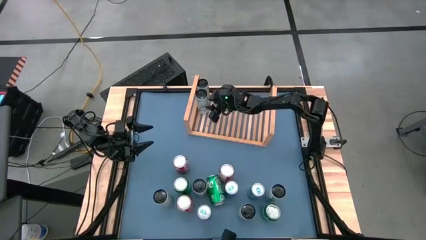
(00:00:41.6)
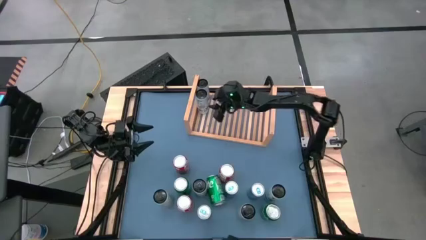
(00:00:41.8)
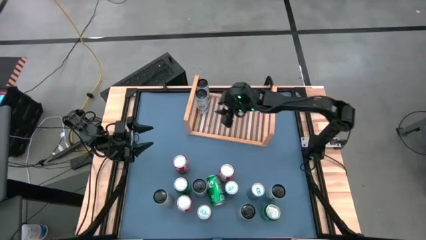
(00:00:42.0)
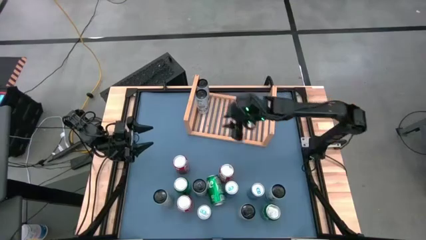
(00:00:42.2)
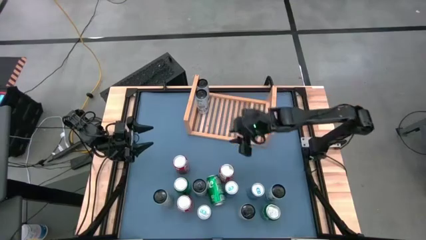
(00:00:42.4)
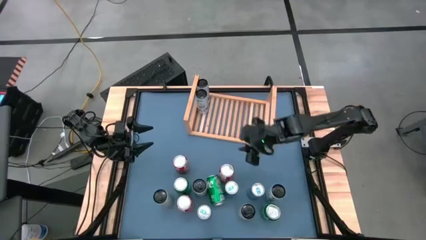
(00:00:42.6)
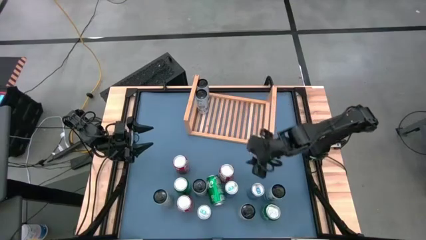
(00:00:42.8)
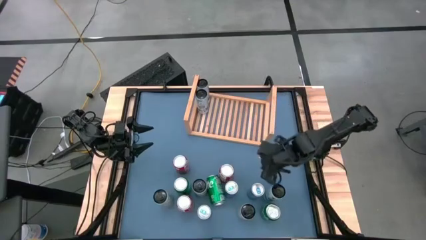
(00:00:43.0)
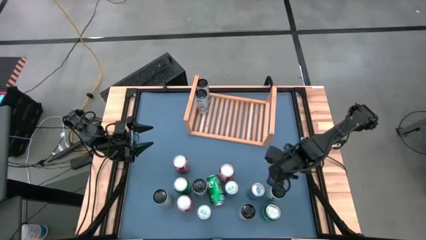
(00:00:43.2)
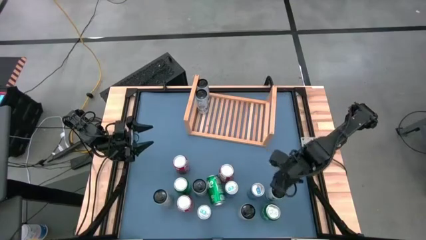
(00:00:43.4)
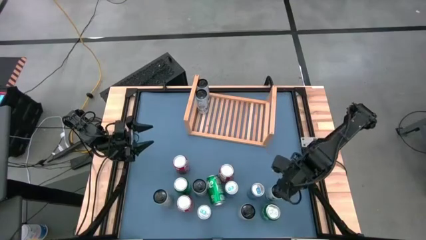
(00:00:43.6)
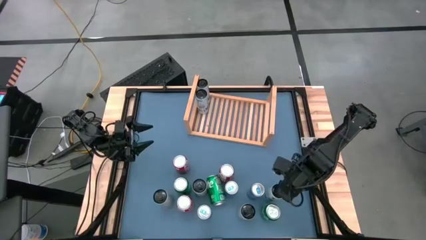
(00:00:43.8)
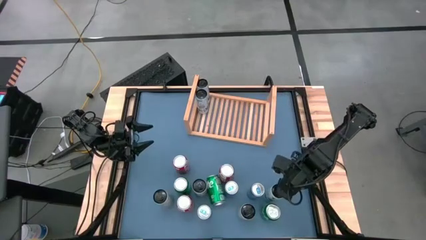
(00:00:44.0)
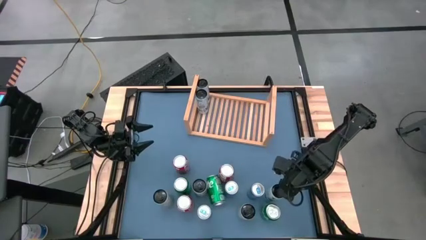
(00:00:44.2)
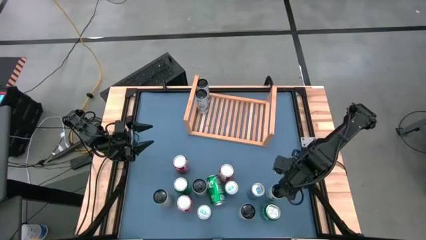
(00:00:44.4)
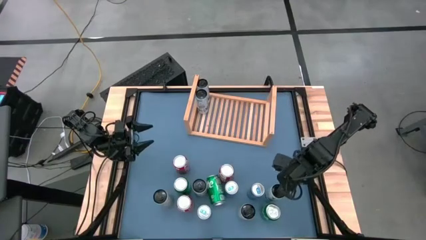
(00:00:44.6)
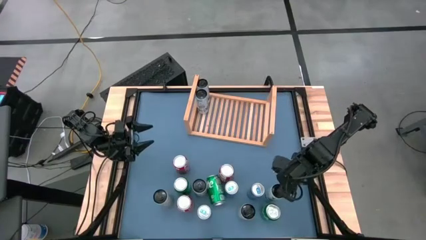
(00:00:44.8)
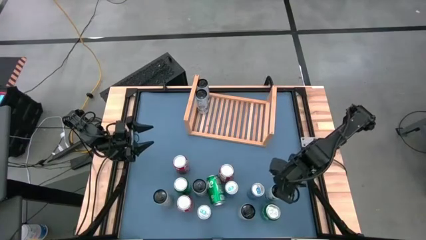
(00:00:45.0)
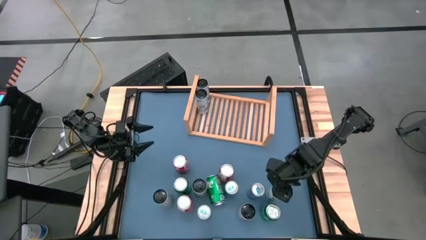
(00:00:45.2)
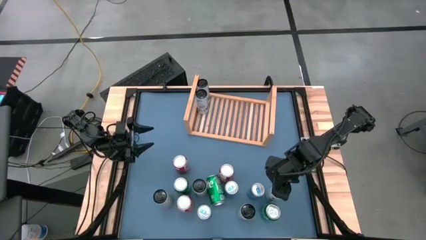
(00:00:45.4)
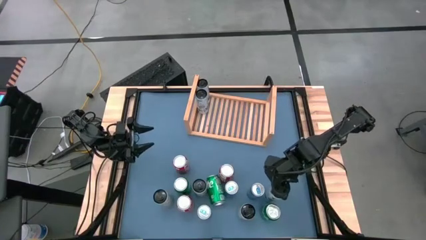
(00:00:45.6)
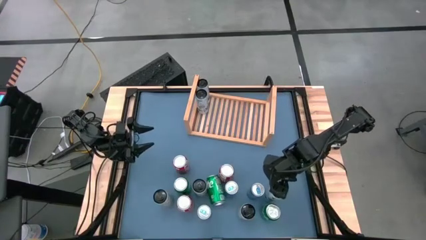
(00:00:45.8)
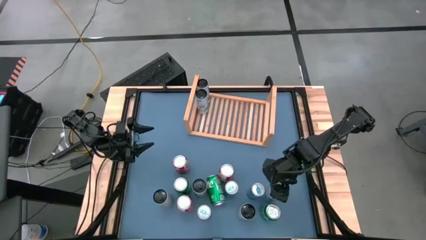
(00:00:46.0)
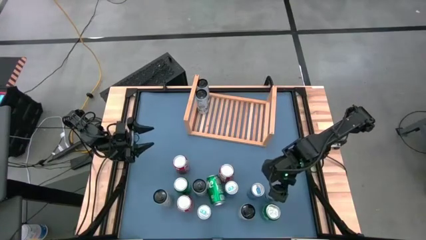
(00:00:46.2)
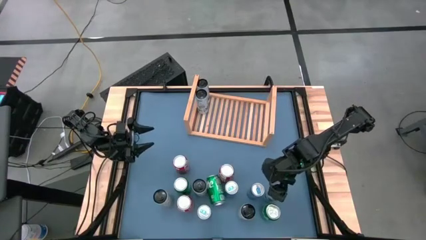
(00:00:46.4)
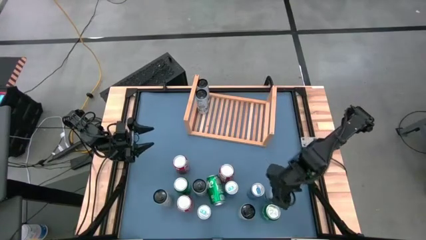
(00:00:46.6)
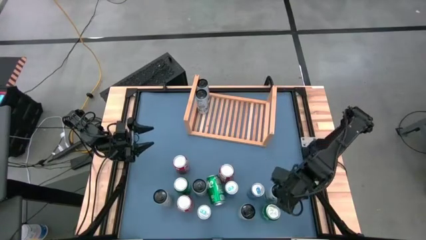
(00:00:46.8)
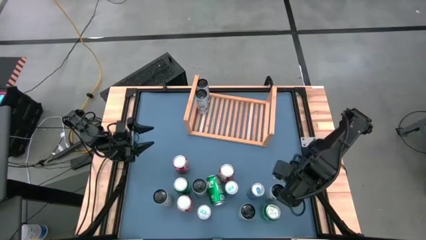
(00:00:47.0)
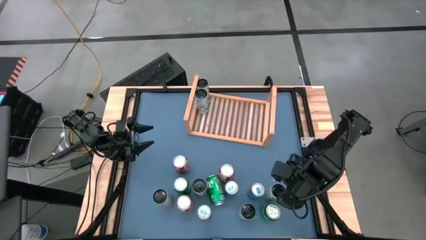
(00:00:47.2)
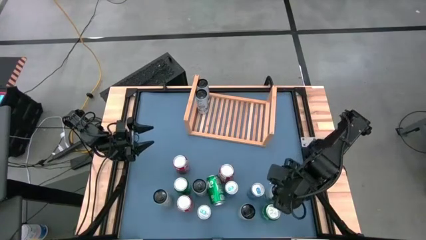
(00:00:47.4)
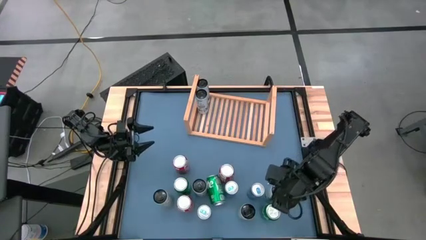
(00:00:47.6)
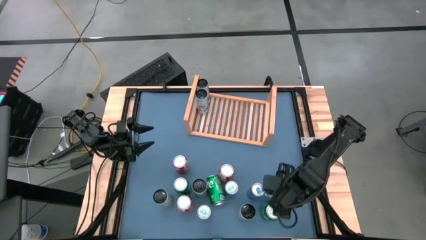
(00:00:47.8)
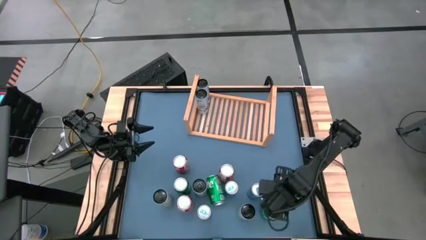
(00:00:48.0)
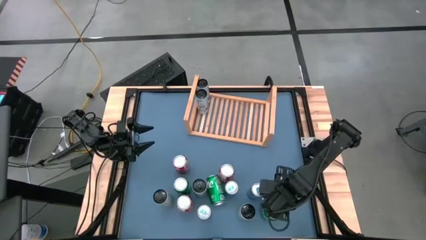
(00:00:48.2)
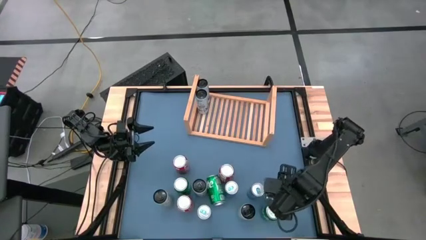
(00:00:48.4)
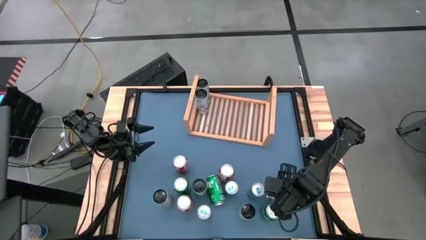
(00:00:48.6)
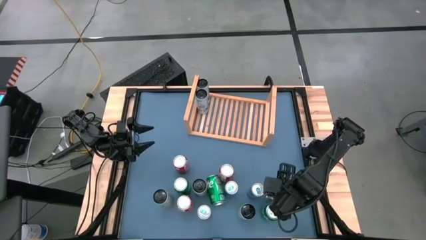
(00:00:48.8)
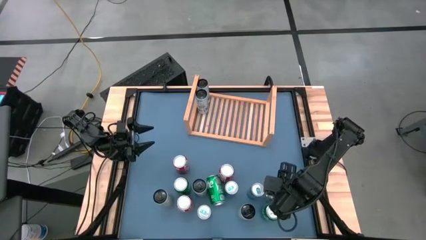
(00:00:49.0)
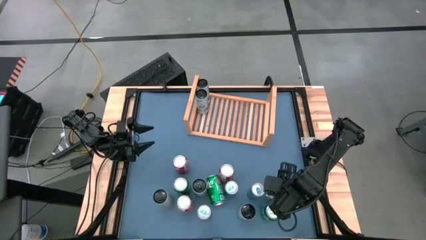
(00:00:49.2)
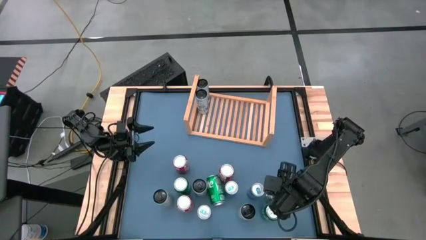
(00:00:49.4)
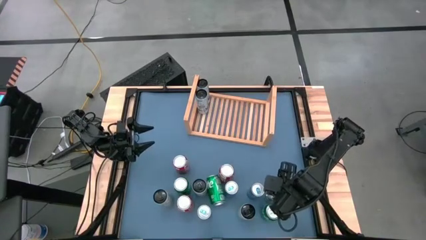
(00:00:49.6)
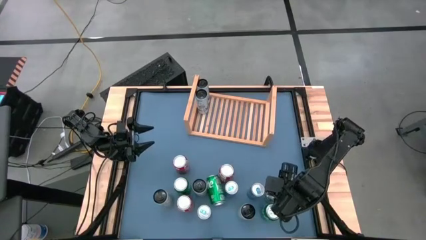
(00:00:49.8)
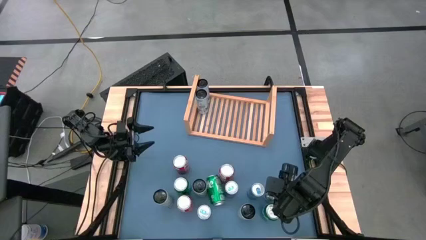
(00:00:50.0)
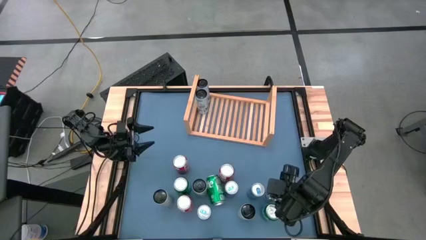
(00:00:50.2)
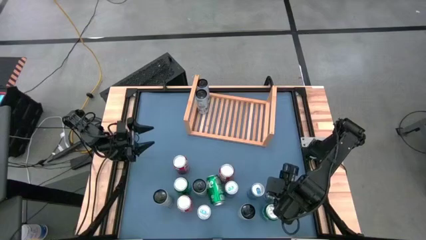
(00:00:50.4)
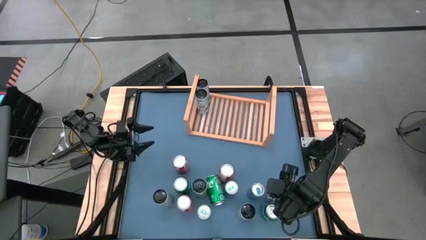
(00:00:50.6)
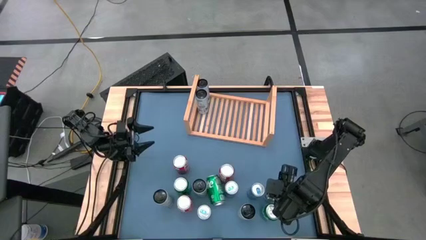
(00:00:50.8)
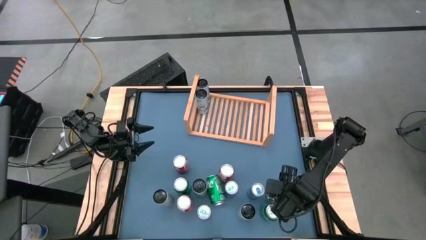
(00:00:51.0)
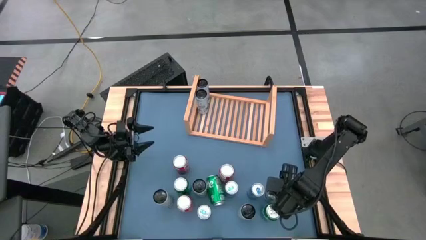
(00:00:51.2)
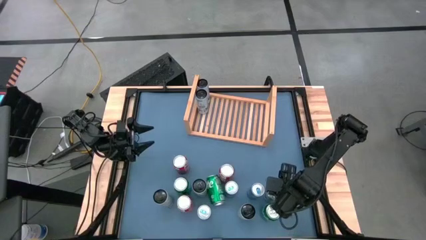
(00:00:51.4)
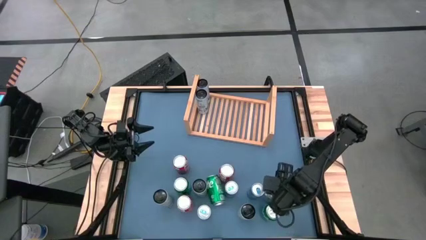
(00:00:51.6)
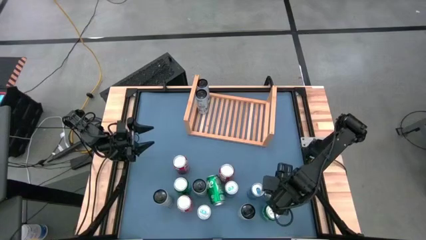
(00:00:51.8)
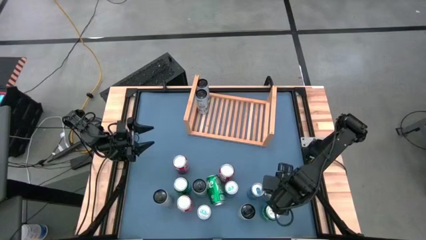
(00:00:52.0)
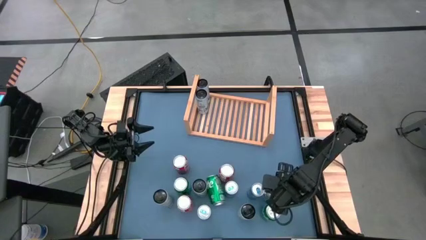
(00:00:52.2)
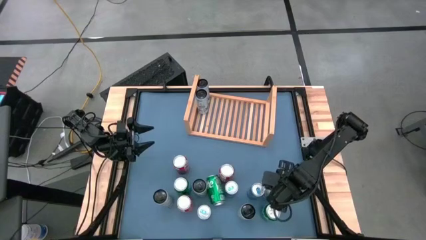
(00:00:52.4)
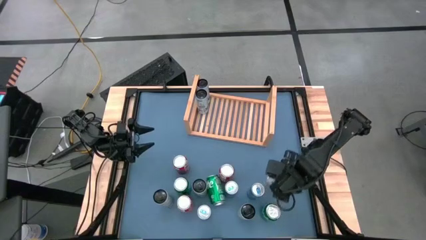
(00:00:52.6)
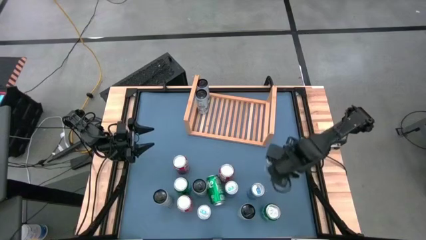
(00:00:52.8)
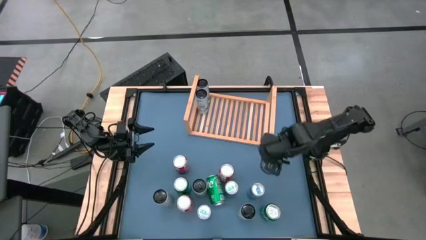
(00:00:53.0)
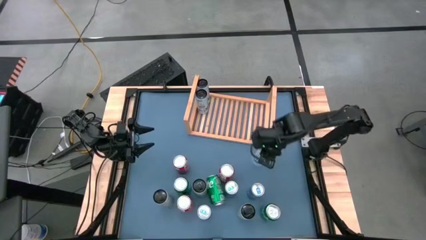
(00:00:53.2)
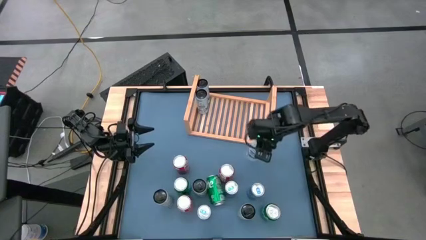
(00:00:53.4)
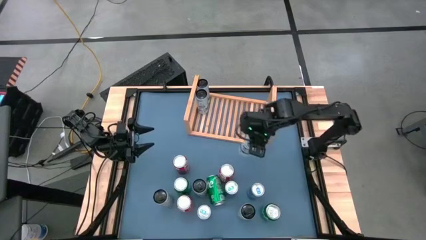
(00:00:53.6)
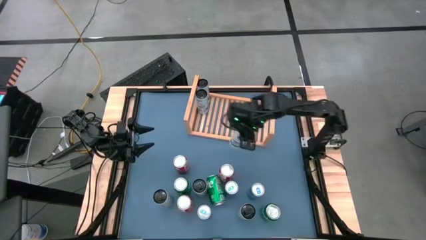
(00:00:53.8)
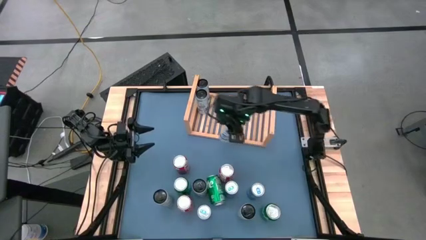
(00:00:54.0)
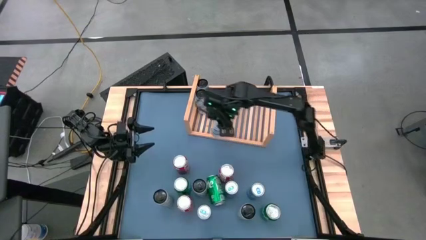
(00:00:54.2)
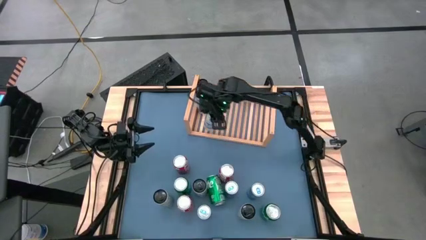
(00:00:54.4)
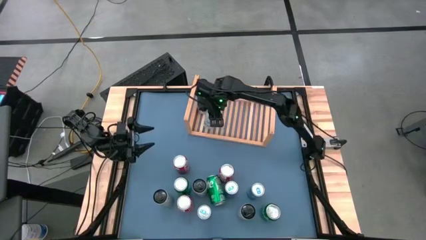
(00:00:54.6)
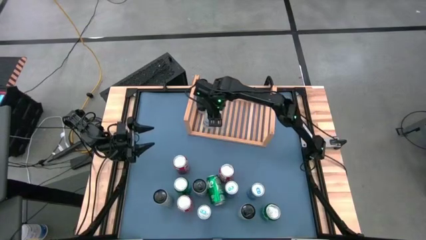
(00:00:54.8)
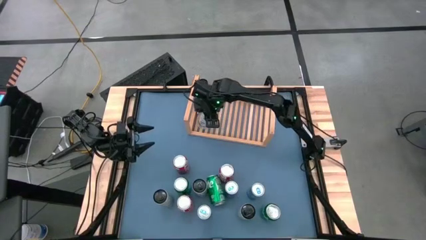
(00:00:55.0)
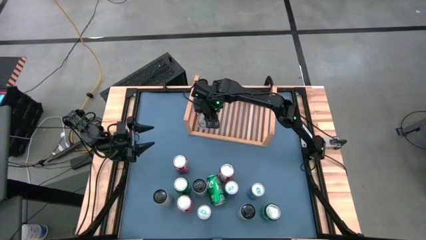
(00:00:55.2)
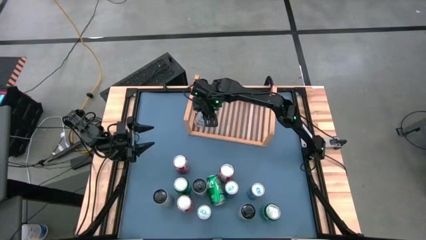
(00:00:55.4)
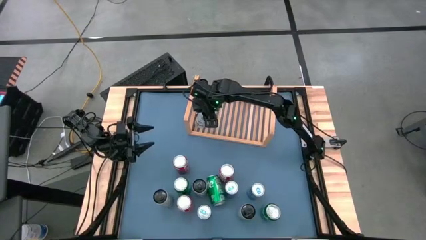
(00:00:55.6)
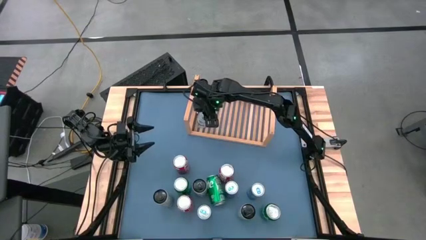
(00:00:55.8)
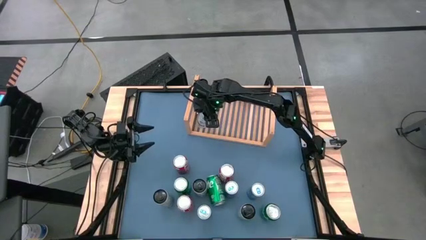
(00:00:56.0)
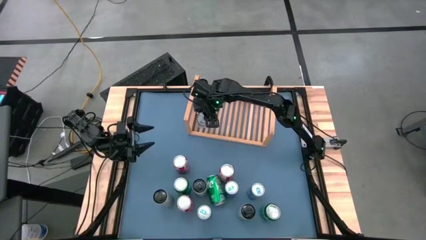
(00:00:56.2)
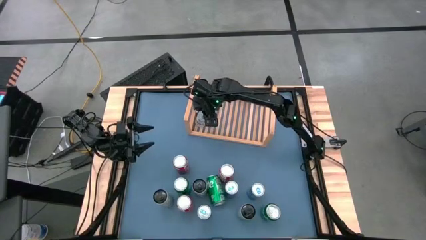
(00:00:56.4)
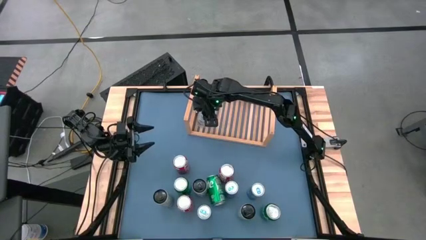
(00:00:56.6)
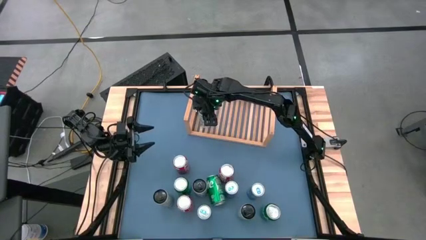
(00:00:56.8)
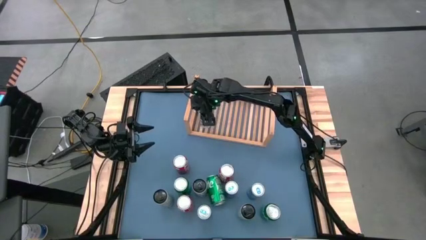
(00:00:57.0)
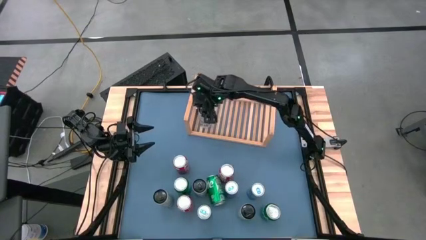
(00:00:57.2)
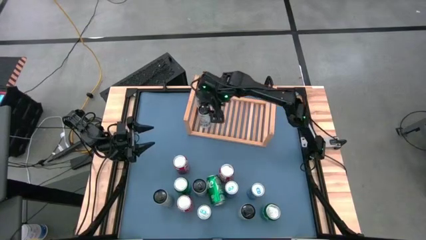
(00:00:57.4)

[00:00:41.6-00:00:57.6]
Task: Place canned beverage on shelf
Put the white blue soda can on the shelf aligned with the other white blue soda can

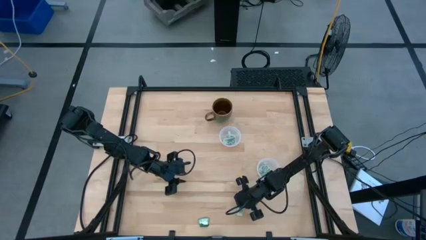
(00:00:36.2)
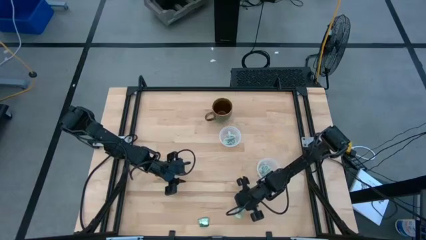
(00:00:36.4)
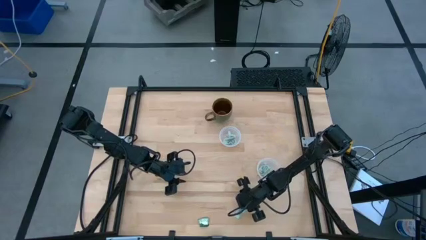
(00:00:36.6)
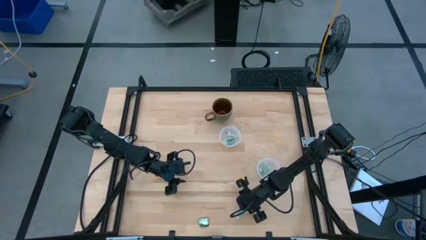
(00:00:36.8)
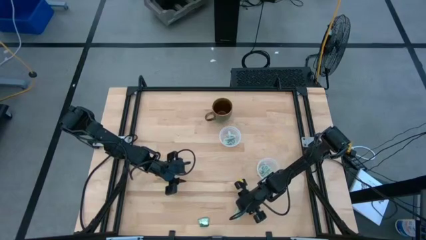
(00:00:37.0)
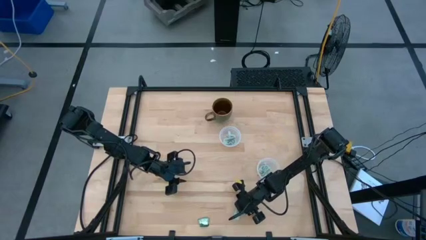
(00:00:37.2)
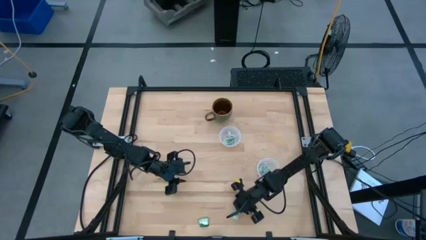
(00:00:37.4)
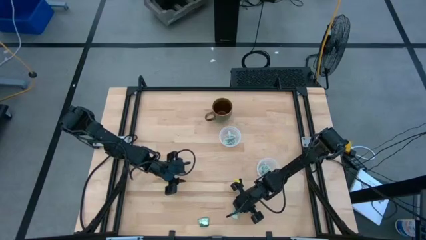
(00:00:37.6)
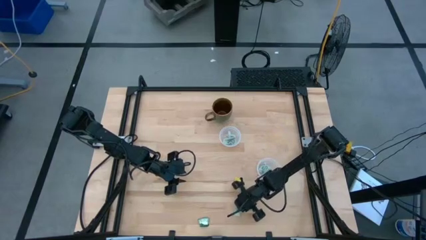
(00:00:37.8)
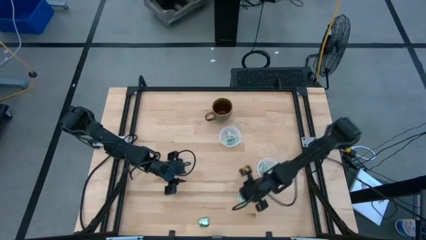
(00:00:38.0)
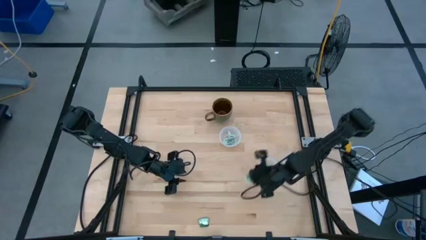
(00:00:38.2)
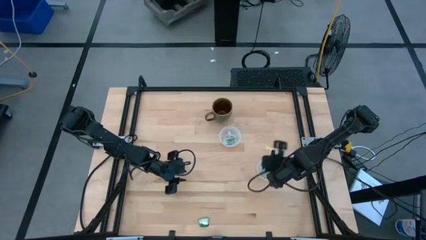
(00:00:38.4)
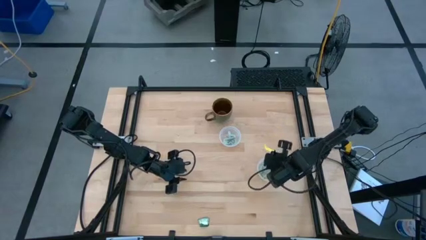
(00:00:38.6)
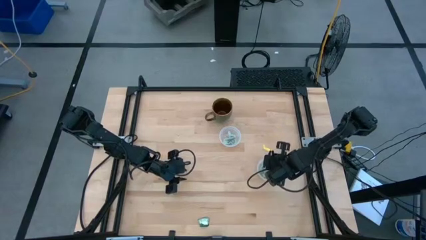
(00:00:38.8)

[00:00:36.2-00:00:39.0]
Task: Pick and place items into bin
Put the stevia packet into the bottom transparent bin
